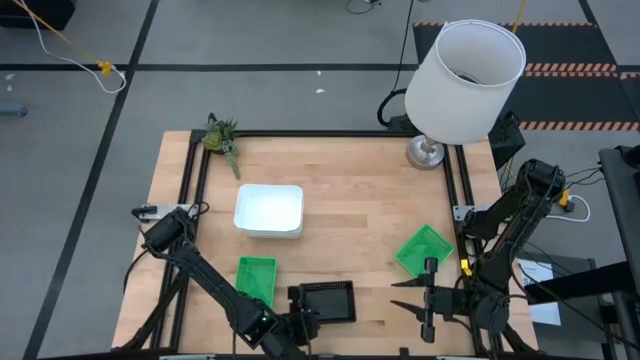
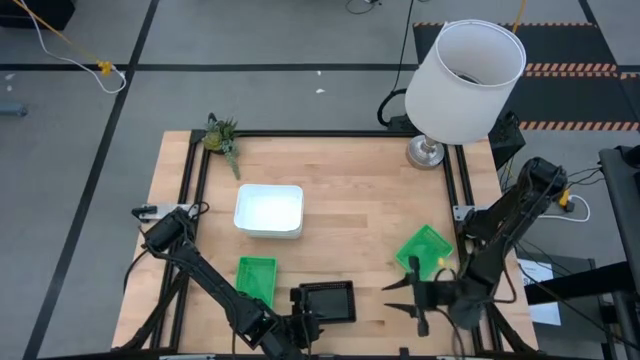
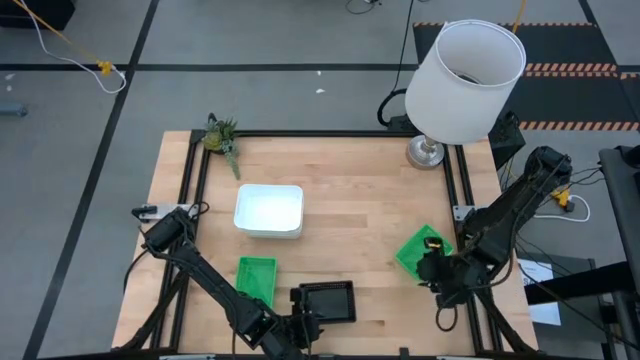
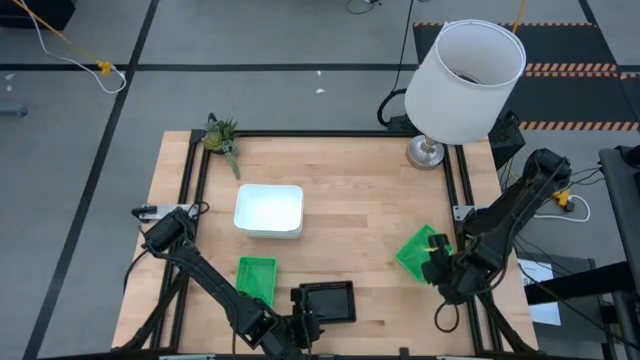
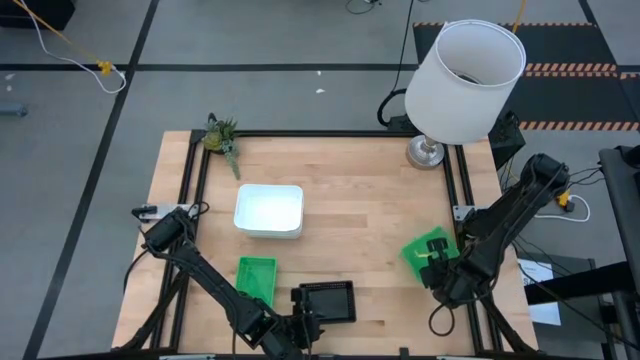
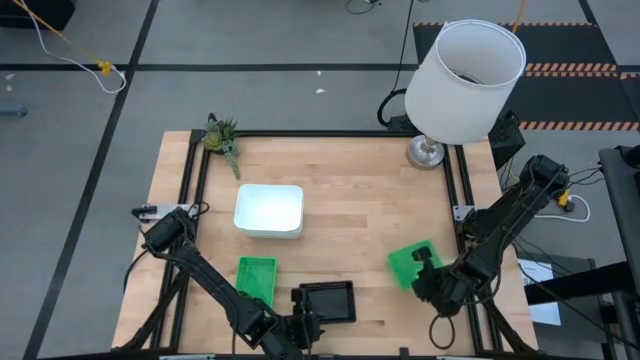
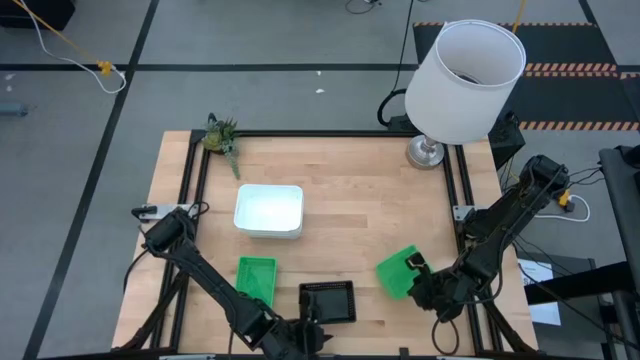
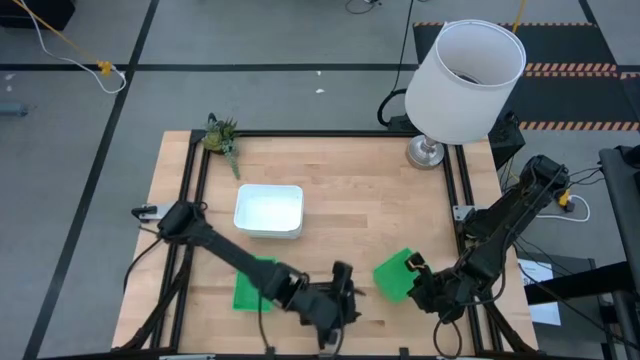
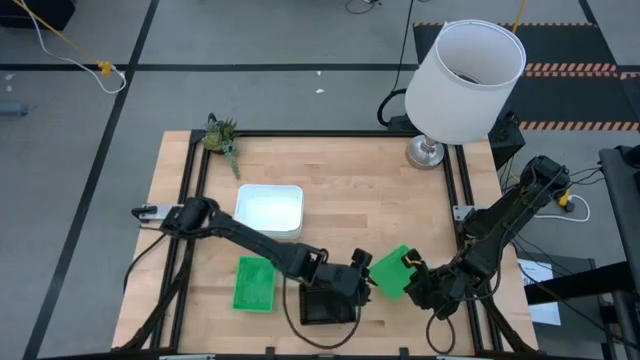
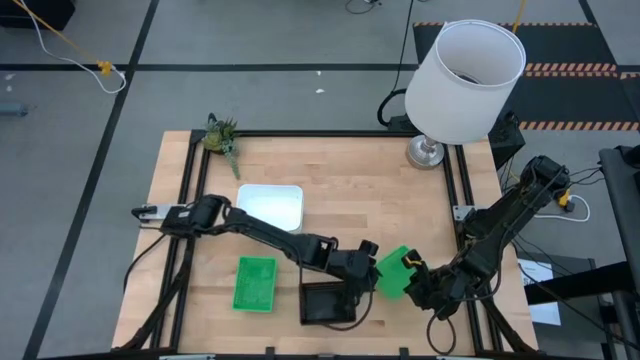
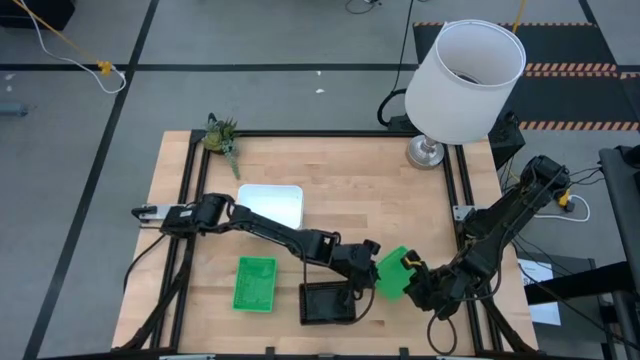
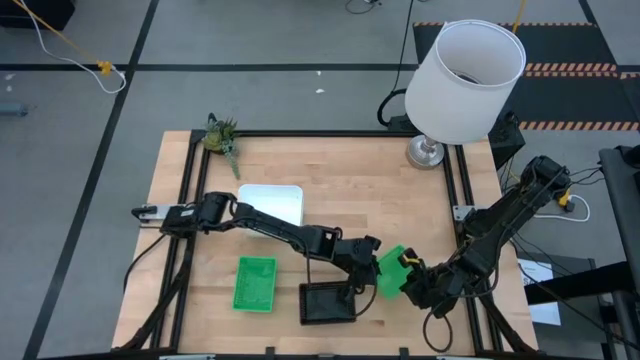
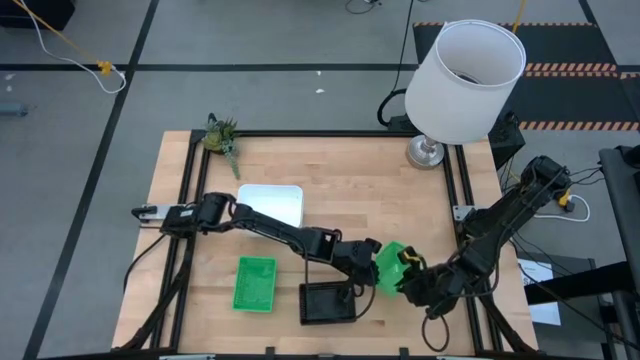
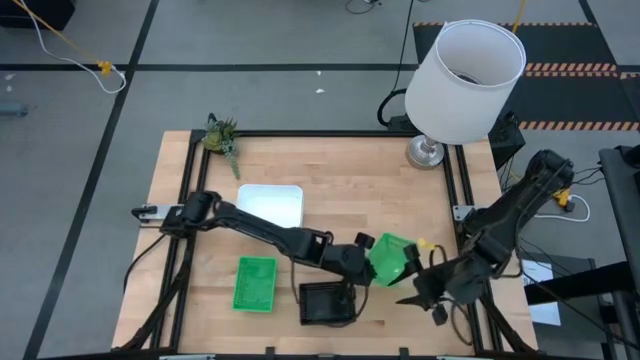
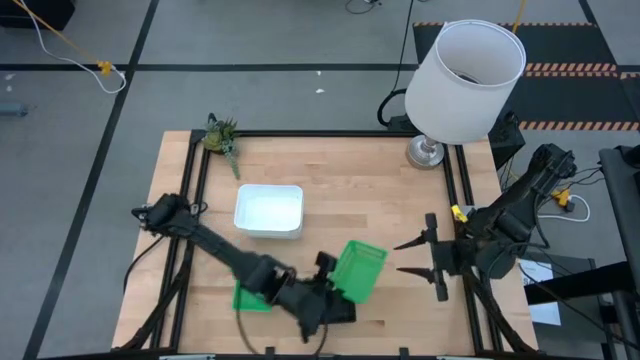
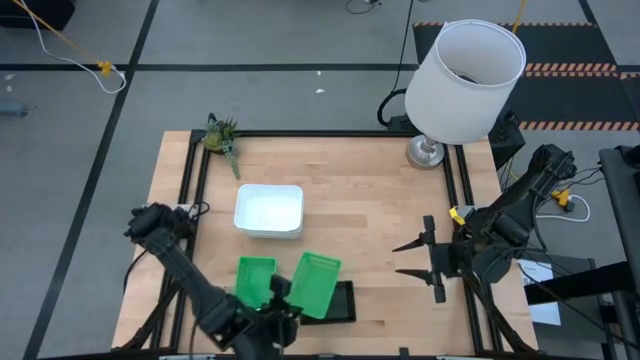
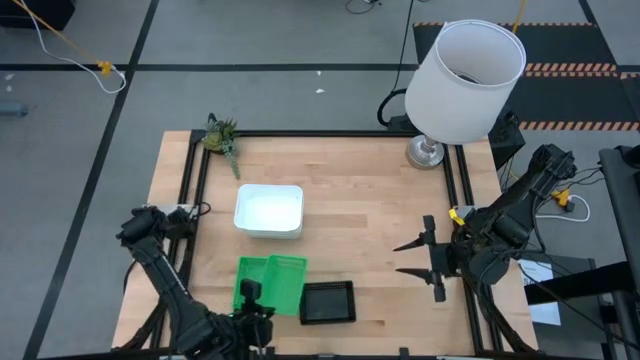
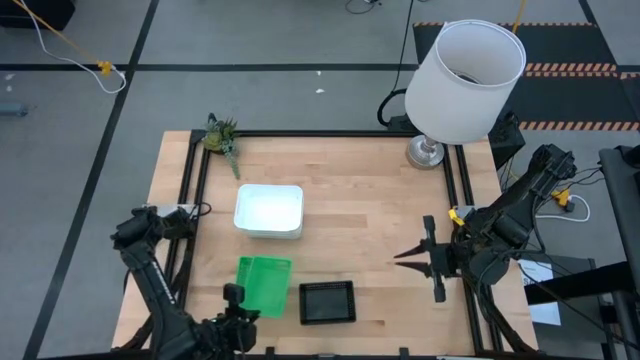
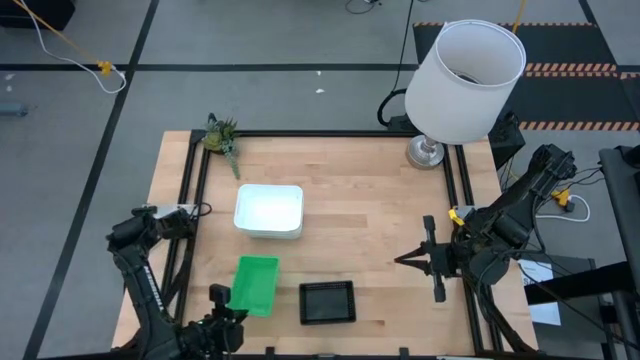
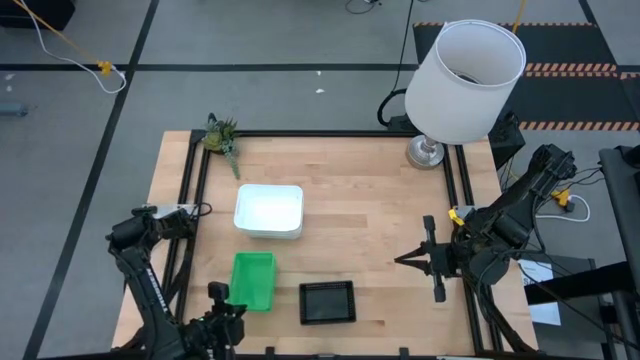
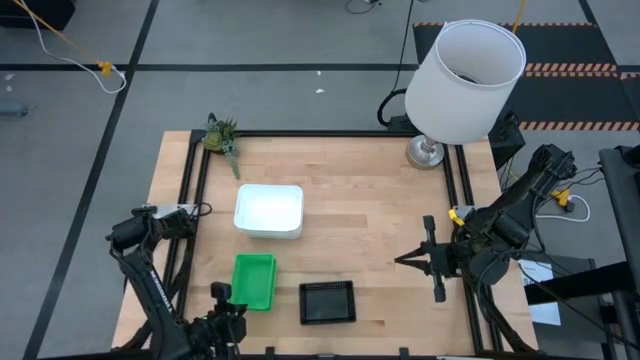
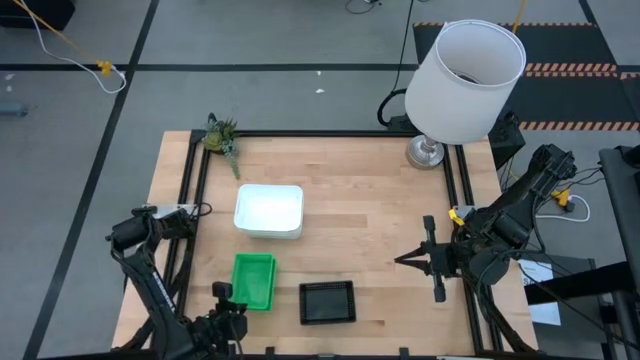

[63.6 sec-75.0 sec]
Stack the right green bin into the stacked left green bins
